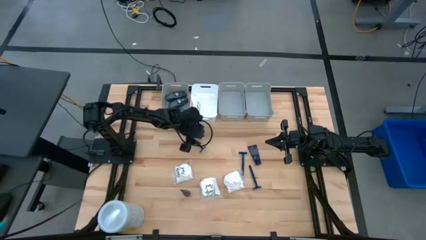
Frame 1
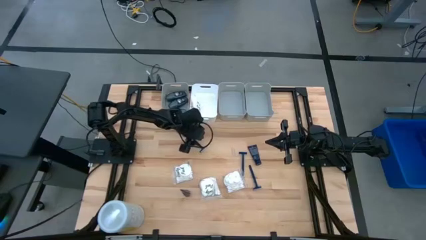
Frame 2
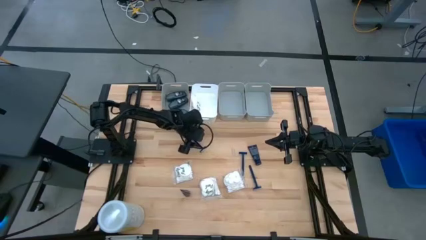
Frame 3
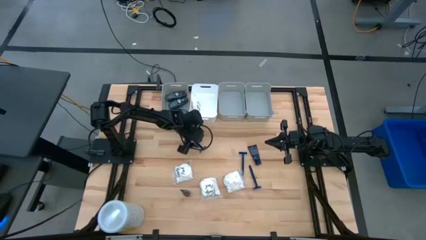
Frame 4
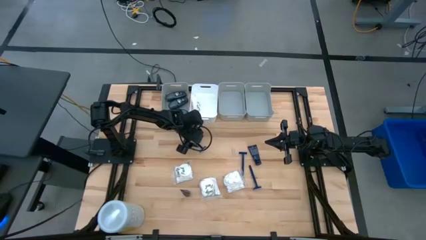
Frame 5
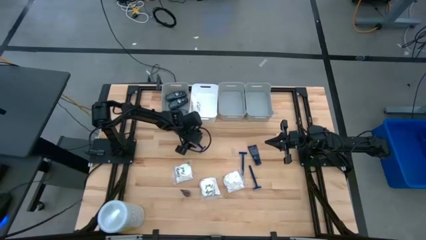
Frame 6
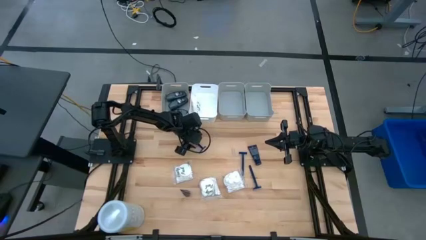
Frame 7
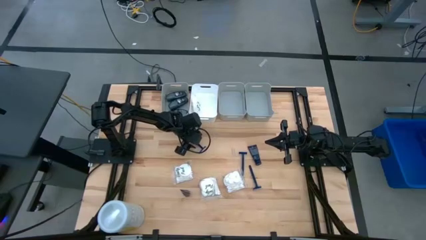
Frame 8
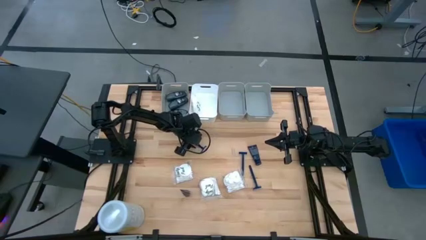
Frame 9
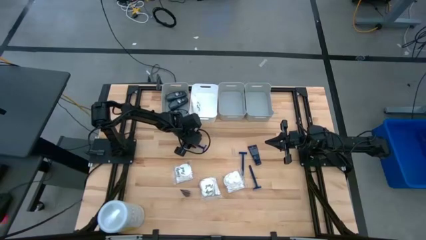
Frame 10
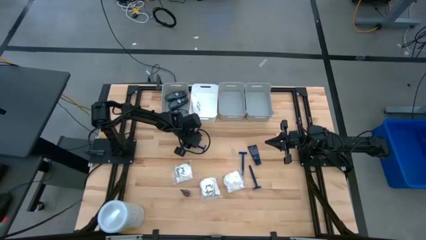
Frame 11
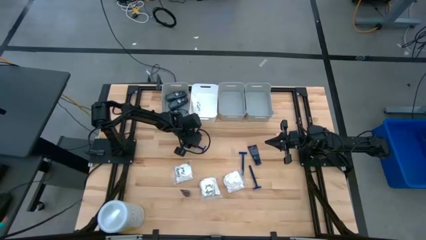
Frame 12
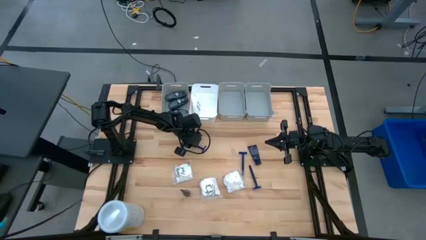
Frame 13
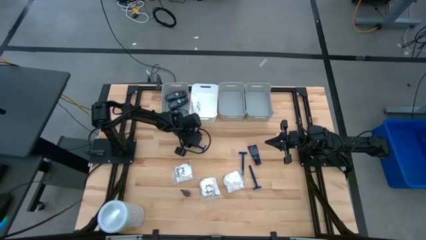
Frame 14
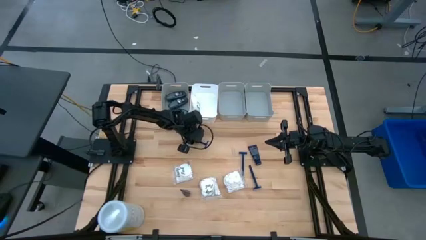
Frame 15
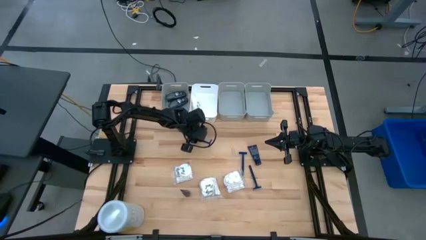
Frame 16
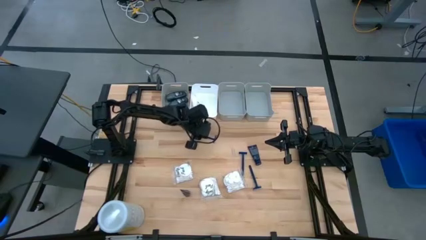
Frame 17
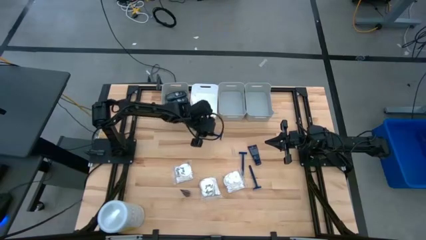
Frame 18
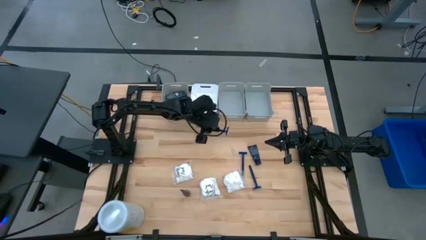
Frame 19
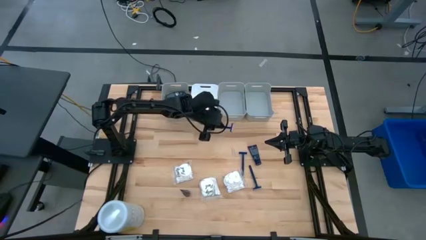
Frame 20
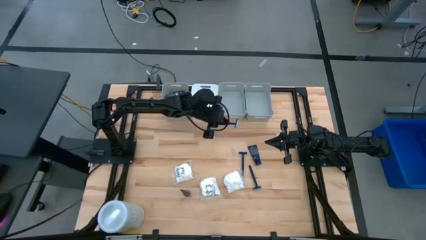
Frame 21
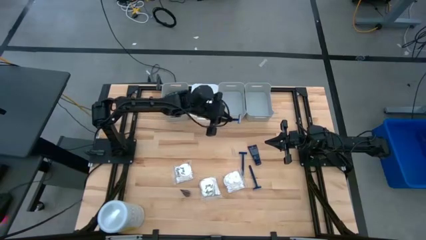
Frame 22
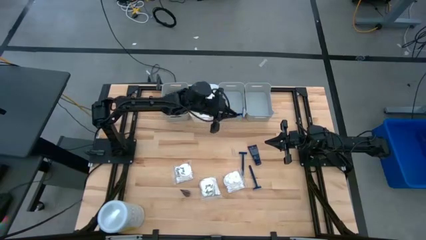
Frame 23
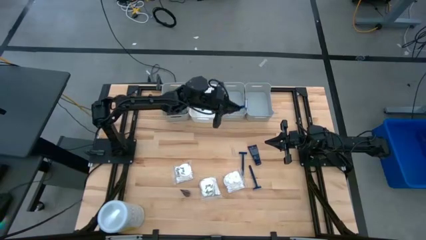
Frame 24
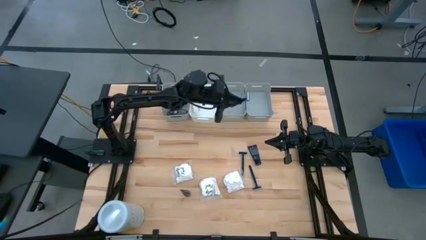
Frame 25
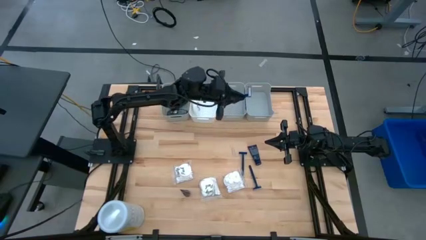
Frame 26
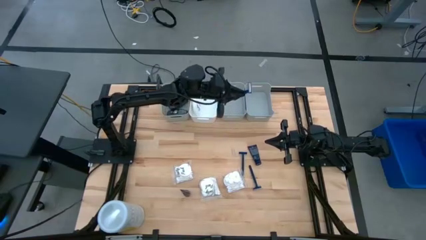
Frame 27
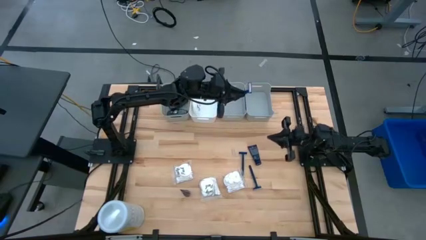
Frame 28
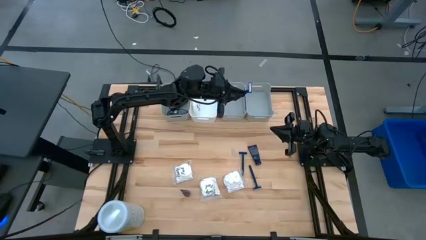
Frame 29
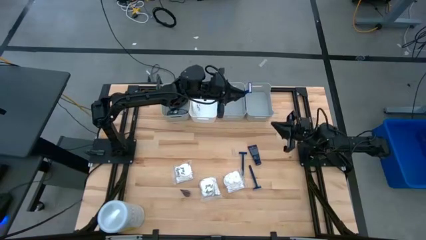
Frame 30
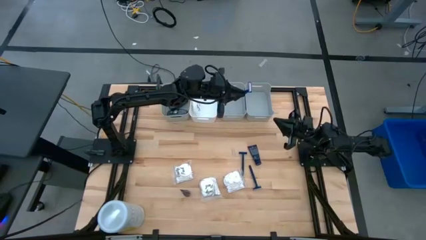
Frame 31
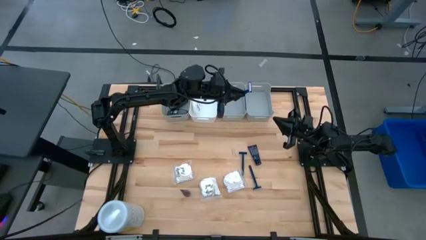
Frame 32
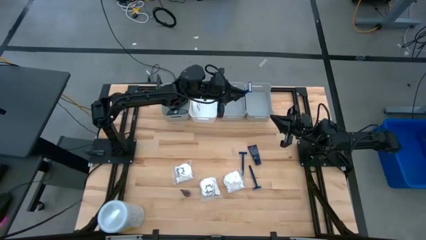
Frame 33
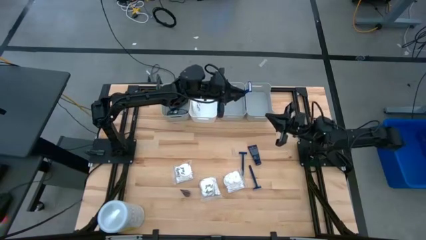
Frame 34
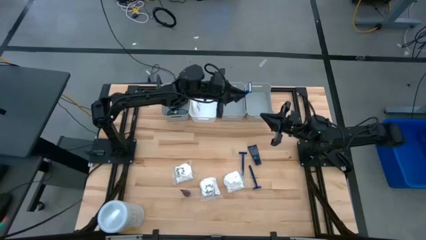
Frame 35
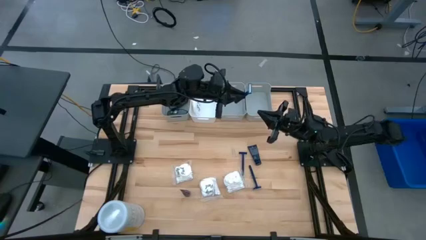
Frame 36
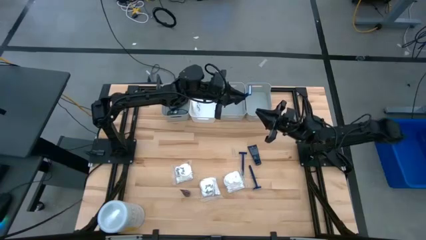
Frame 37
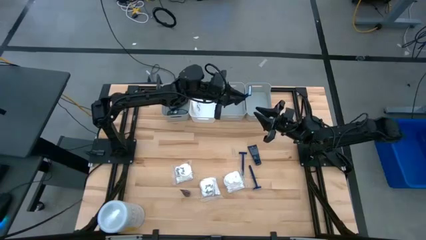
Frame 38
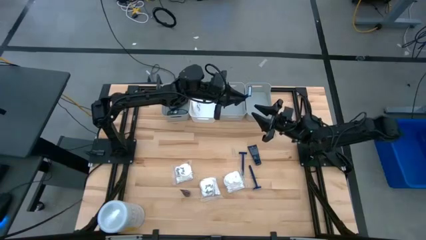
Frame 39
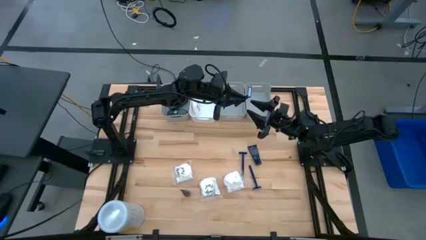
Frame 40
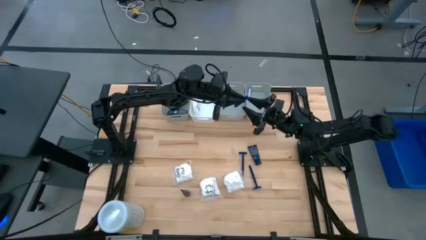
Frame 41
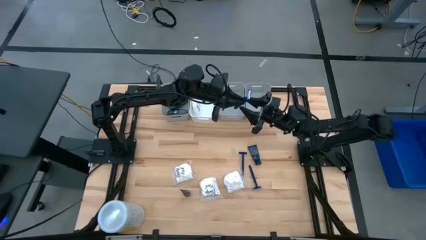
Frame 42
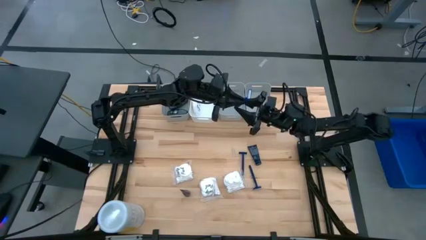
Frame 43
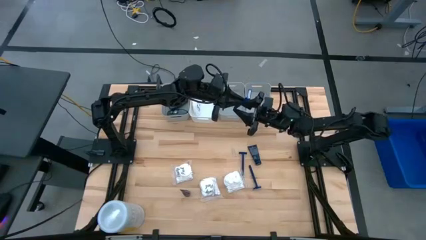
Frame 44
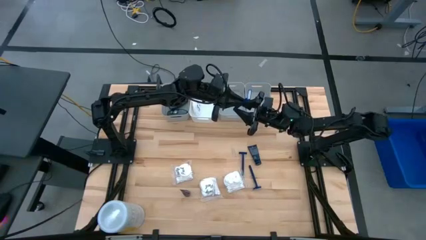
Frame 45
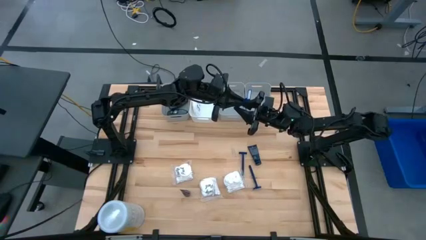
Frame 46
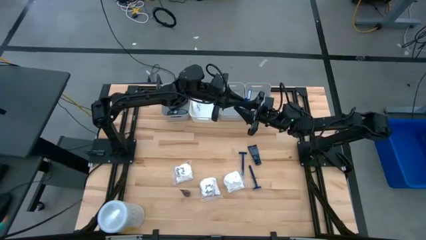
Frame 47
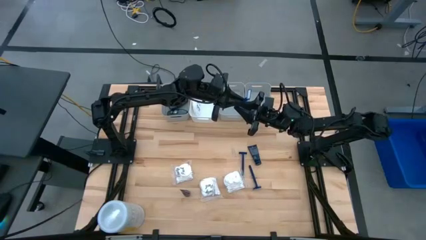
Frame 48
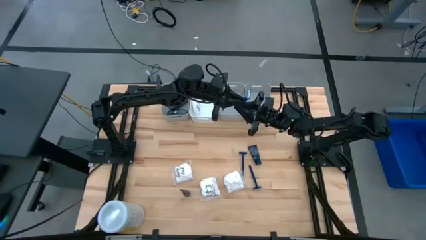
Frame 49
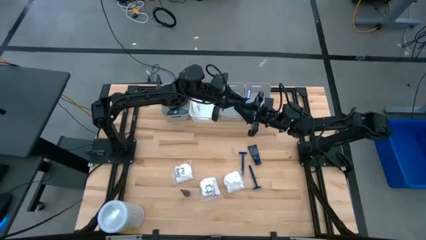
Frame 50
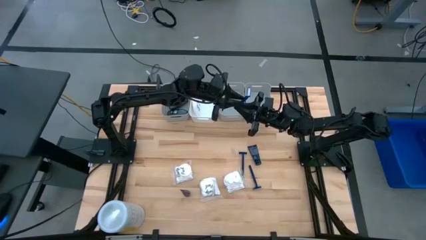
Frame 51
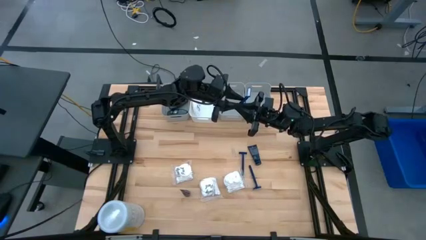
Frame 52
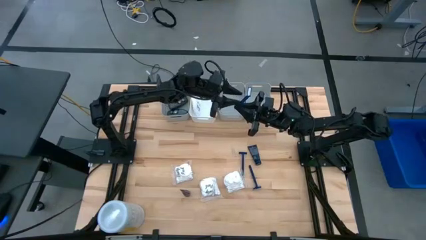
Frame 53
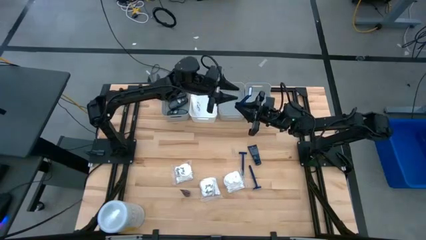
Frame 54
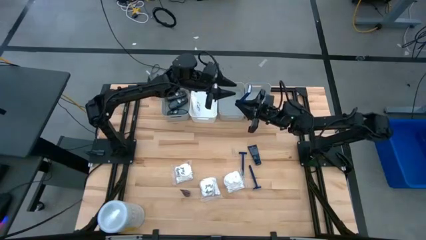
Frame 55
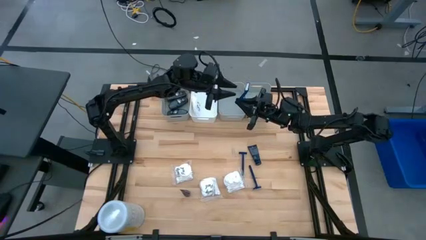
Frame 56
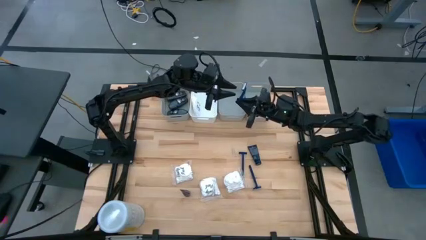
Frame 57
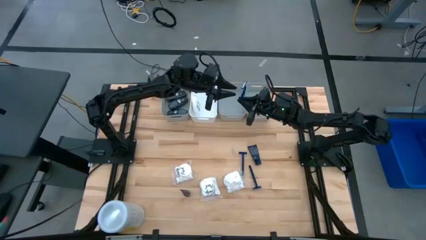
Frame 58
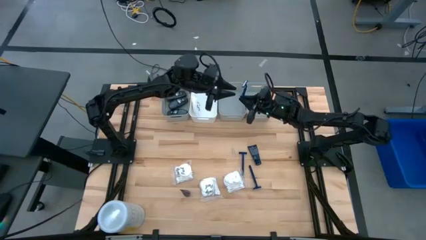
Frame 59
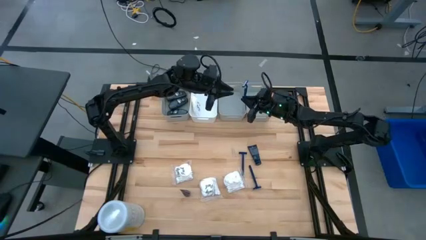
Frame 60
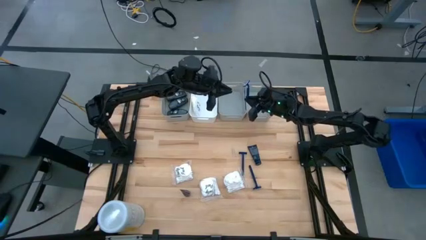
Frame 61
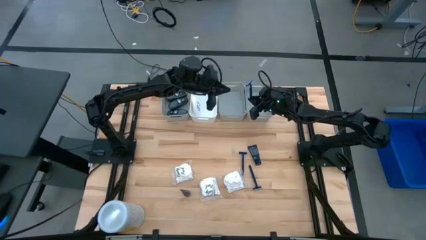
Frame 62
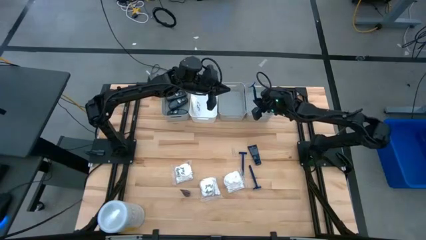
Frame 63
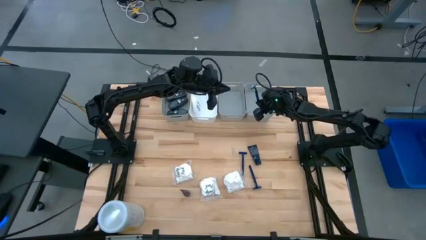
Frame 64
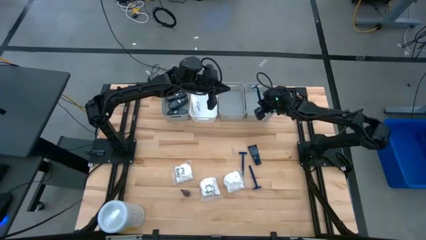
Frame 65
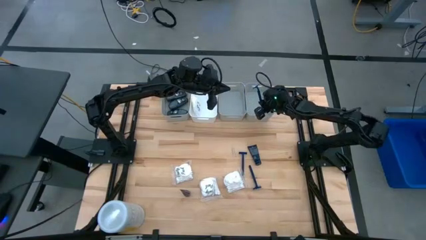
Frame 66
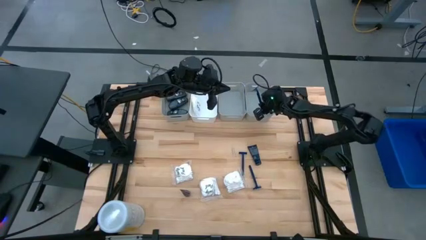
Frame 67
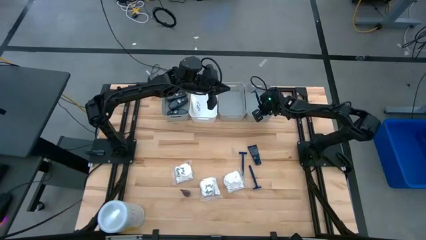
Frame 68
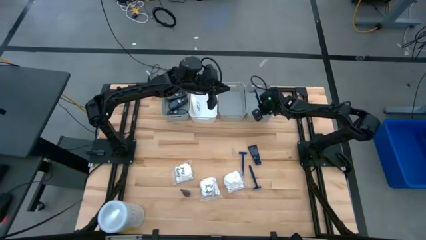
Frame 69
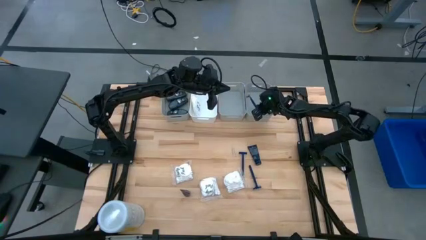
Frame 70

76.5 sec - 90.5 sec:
Task: Pick & Place Travel size toiletries
Put the blue razor into the right gray bin
